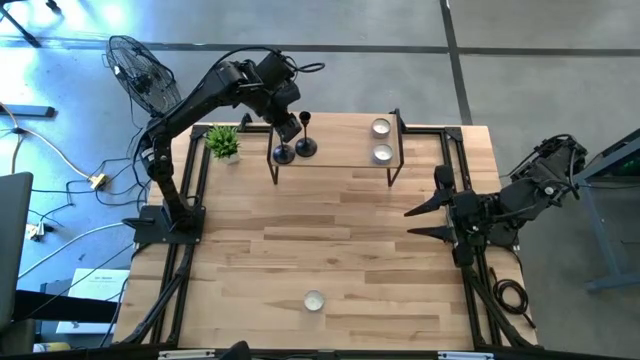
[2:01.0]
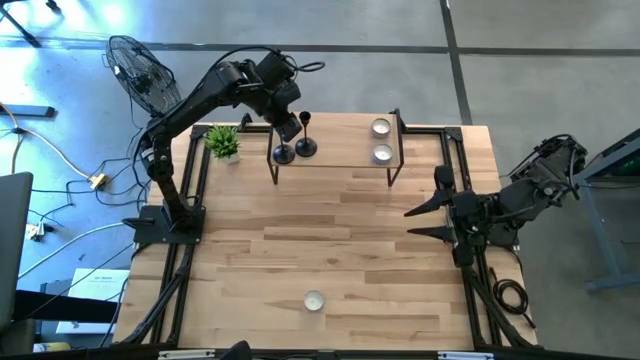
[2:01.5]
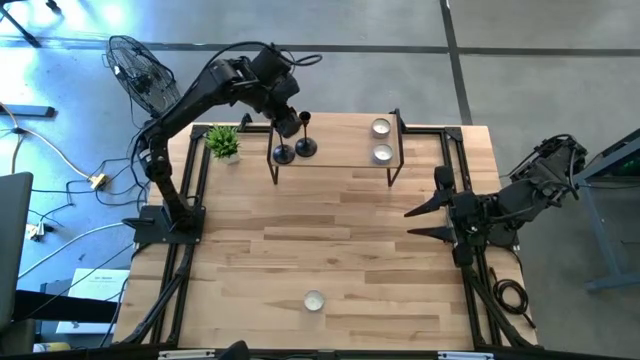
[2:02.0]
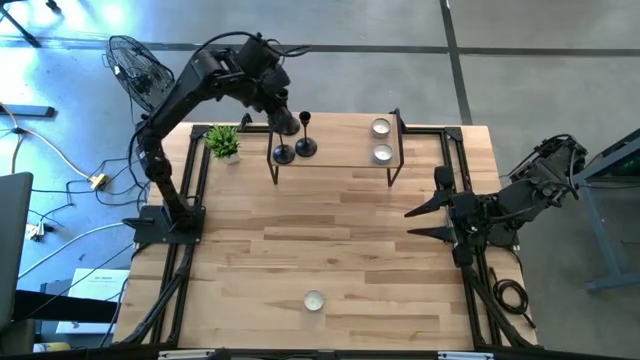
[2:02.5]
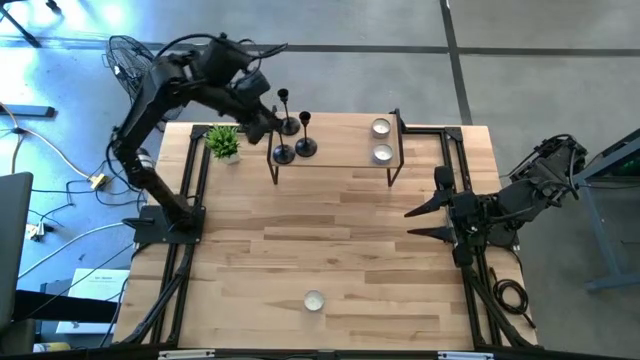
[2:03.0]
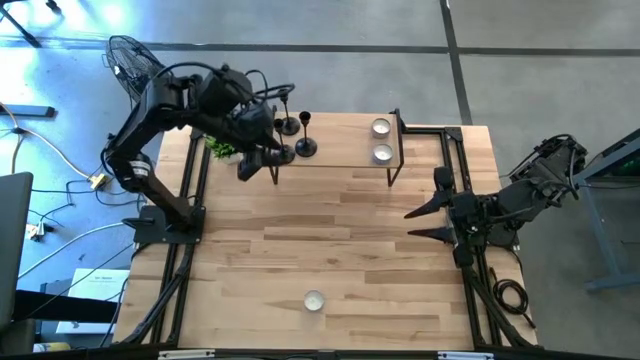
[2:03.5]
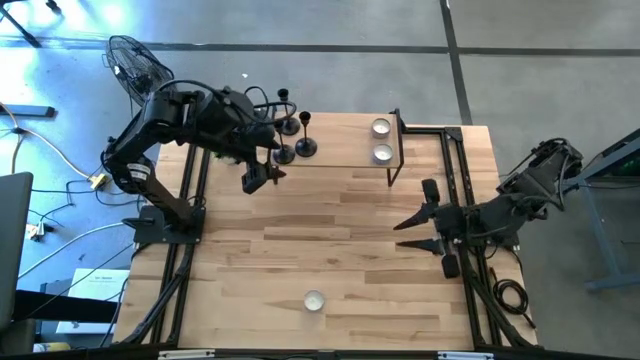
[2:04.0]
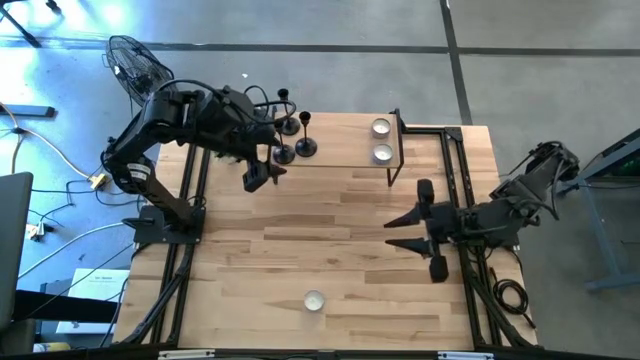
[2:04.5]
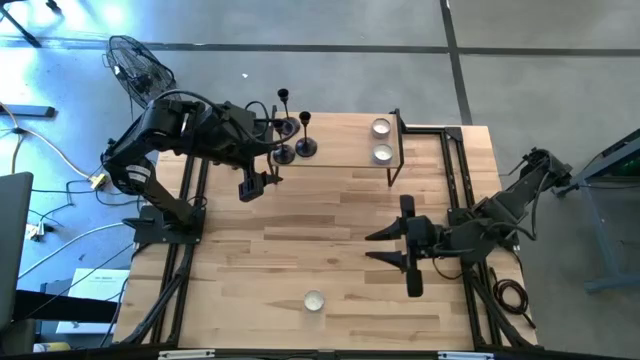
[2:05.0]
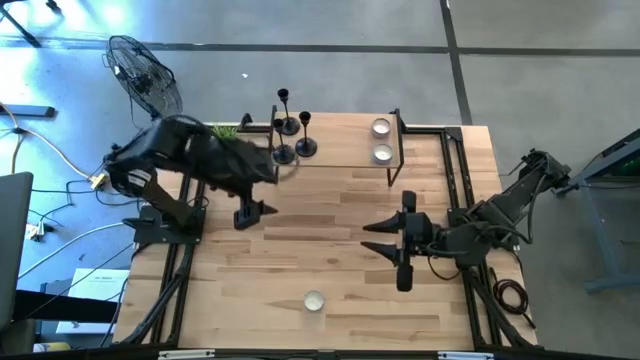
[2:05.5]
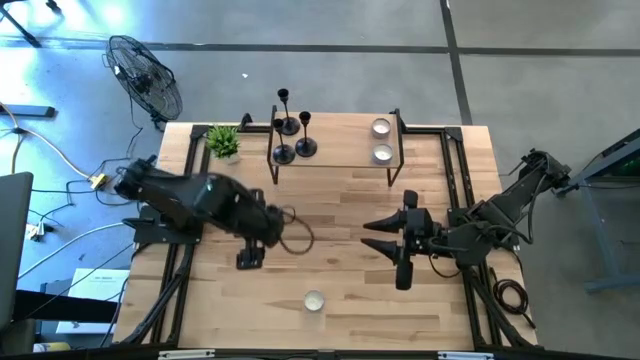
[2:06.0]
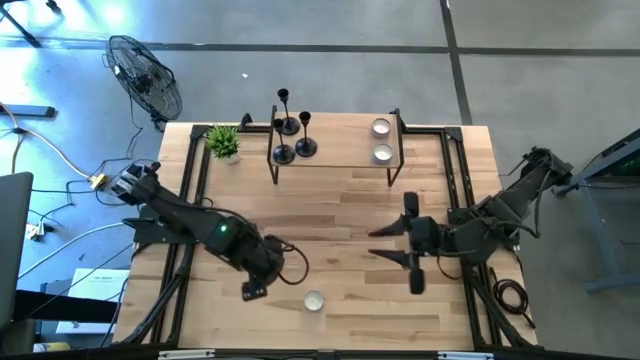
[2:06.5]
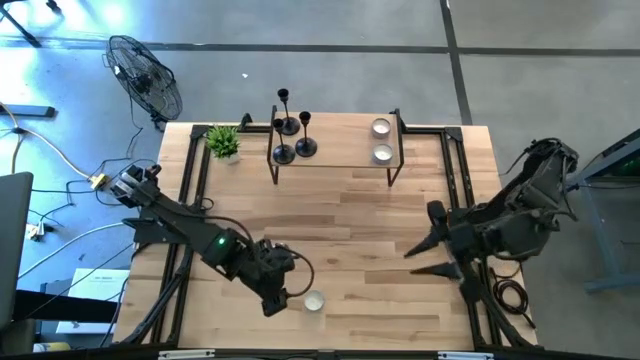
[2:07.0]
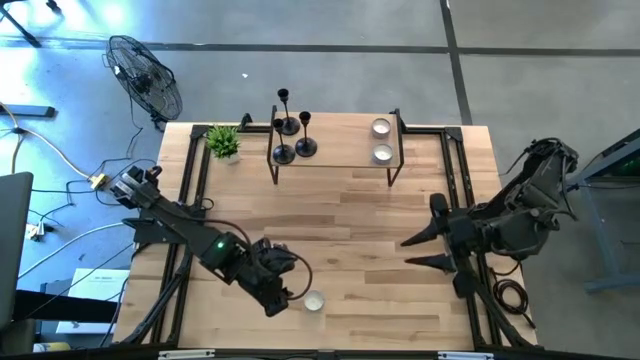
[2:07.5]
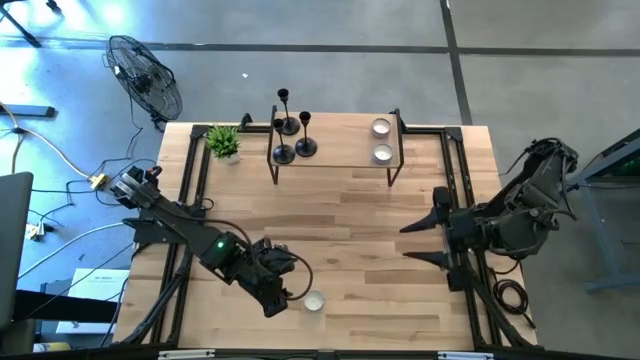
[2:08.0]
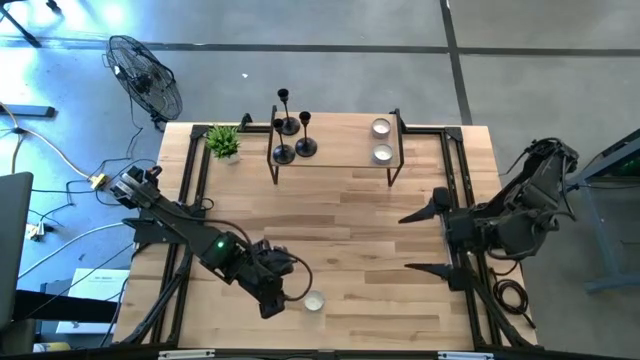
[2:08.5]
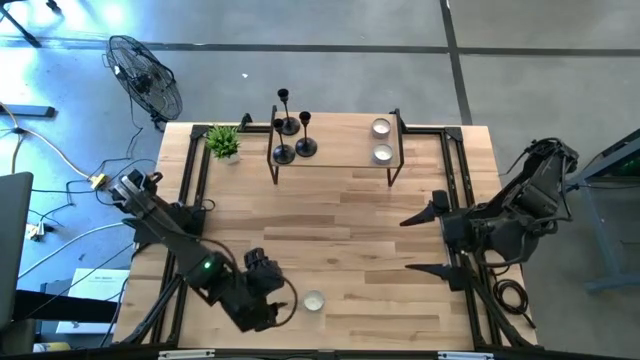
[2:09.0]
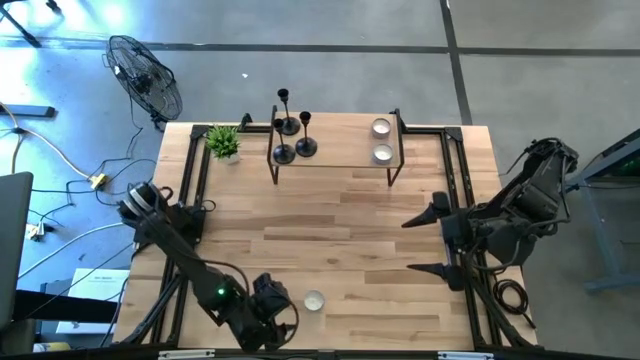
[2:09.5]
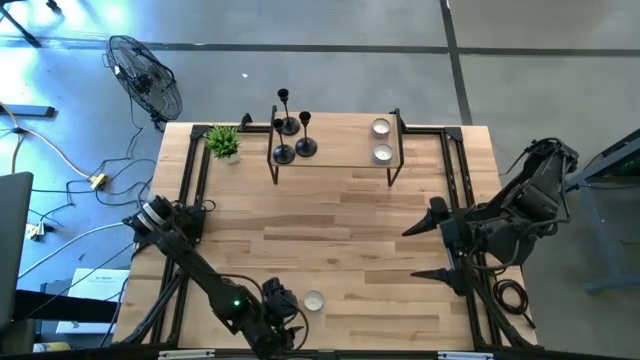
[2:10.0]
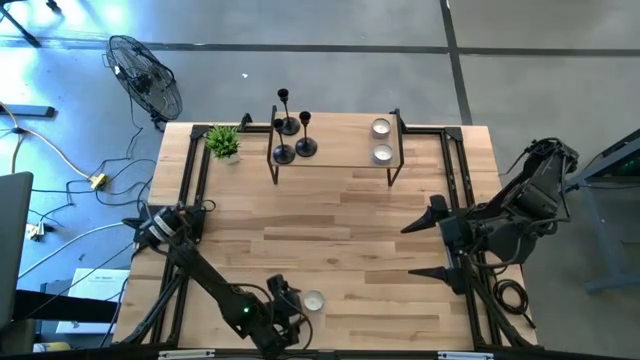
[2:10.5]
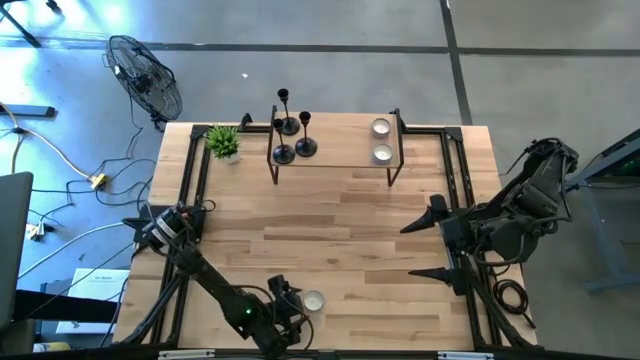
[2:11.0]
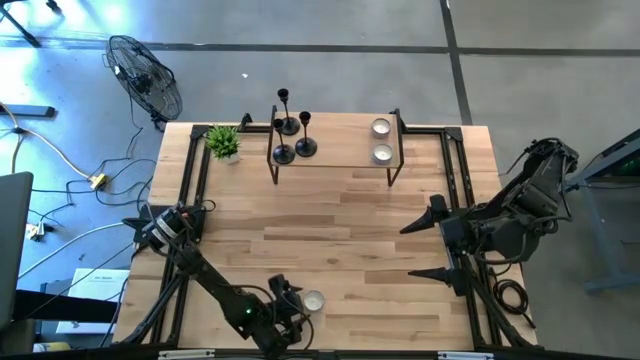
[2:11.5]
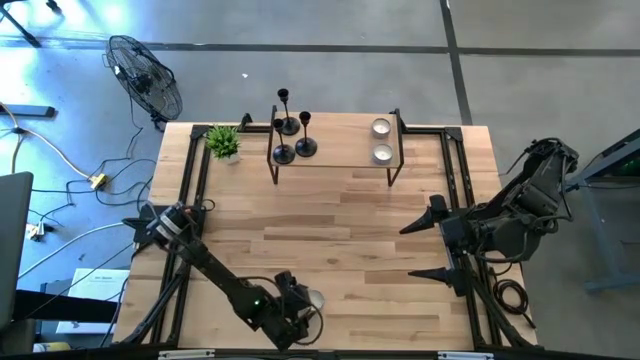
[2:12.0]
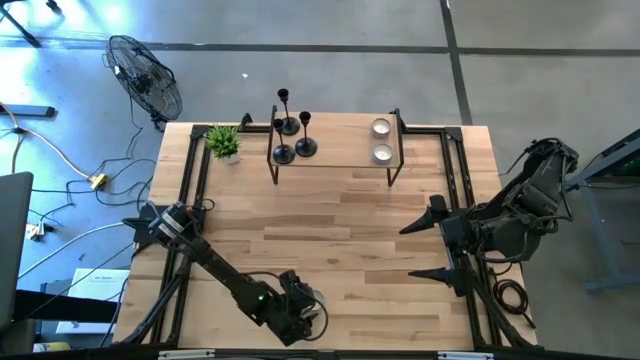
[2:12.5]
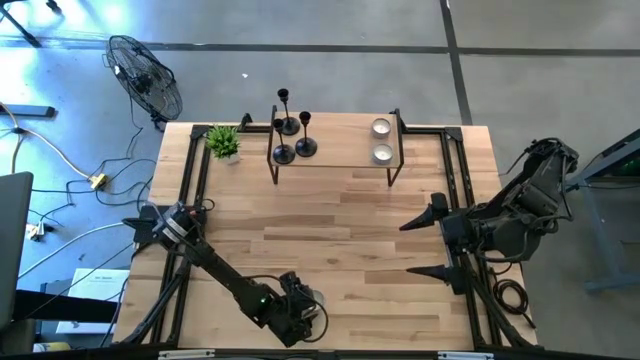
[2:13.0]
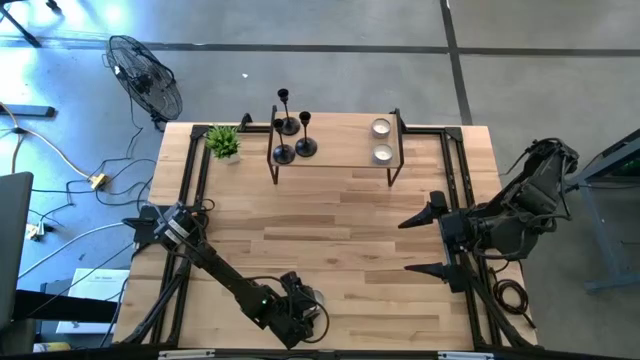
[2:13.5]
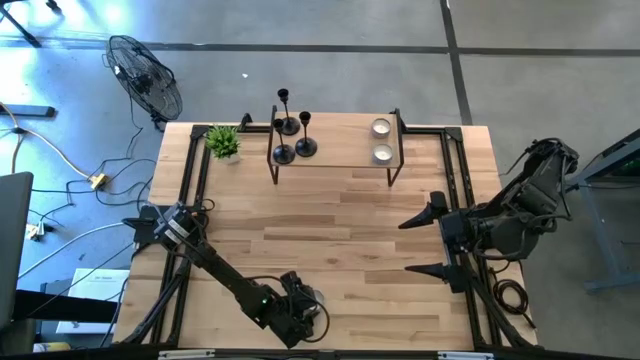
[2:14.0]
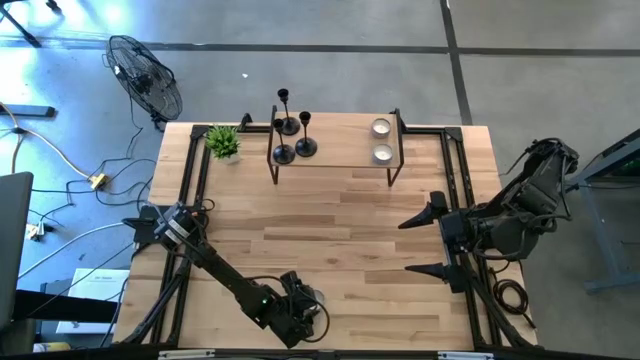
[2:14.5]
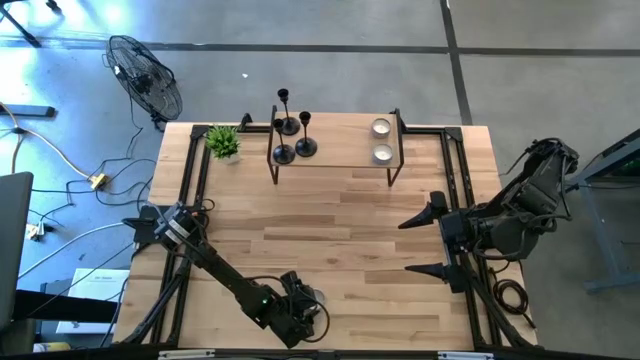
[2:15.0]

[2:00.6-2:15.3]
Task: Pick & Place candle stick holders
Put the red patterned scented candle on the shelf

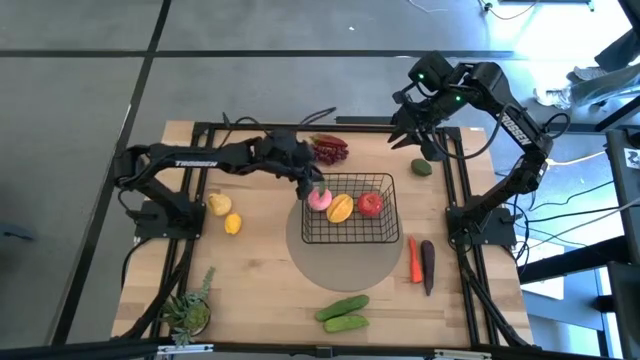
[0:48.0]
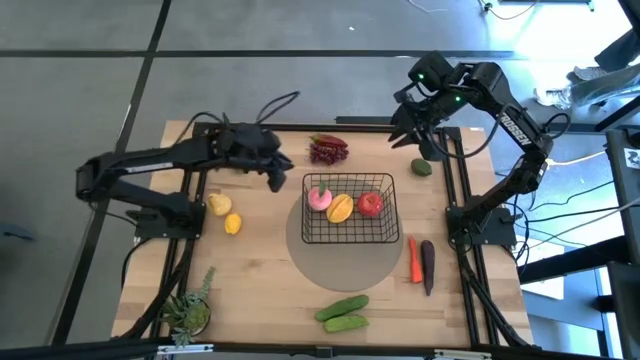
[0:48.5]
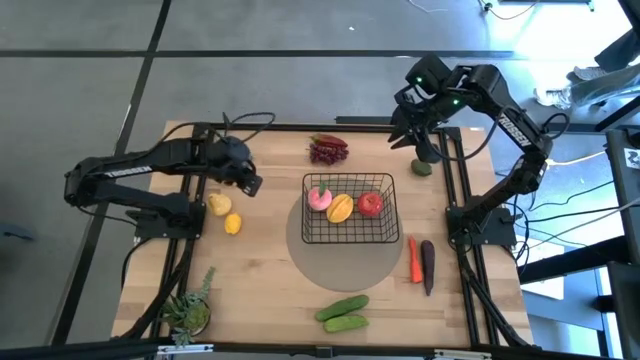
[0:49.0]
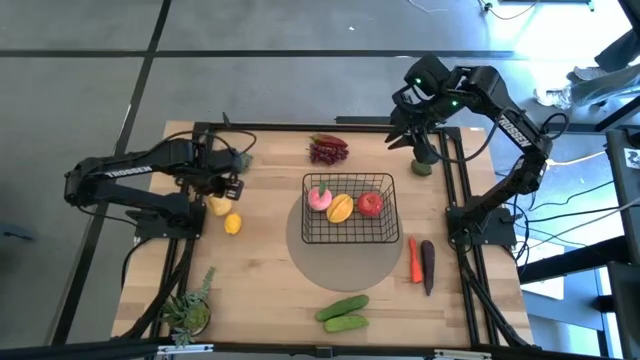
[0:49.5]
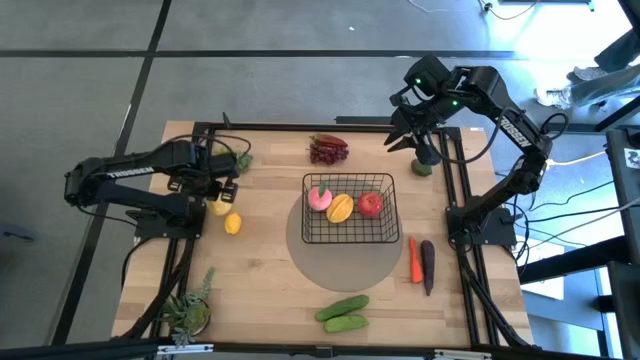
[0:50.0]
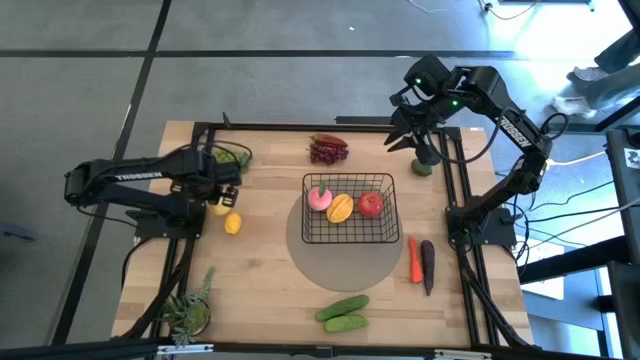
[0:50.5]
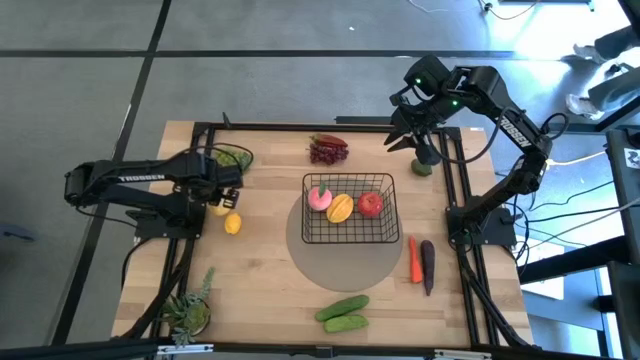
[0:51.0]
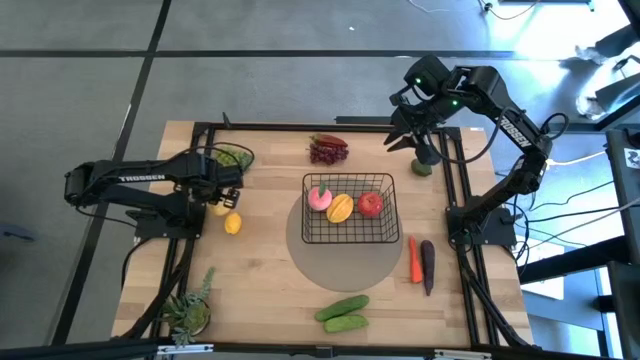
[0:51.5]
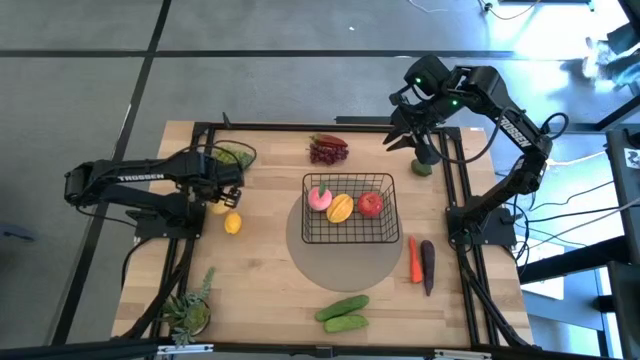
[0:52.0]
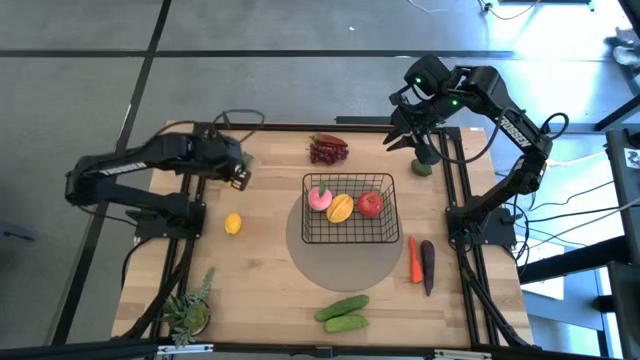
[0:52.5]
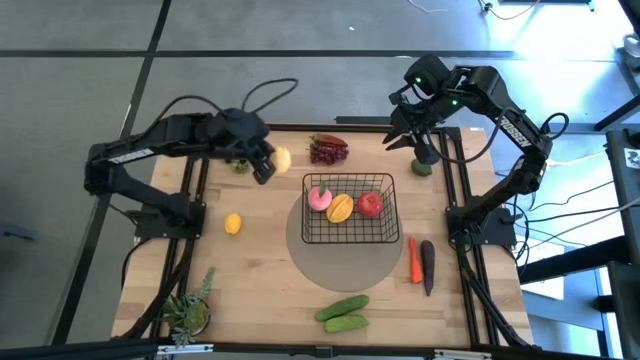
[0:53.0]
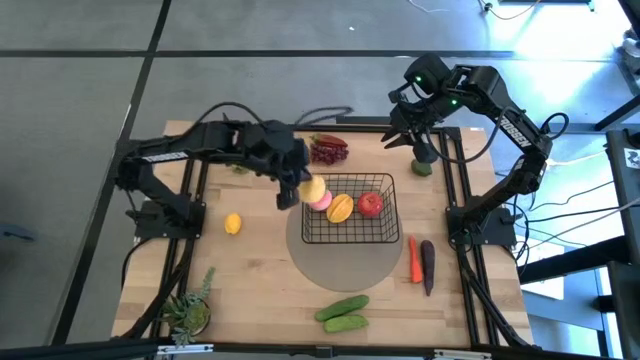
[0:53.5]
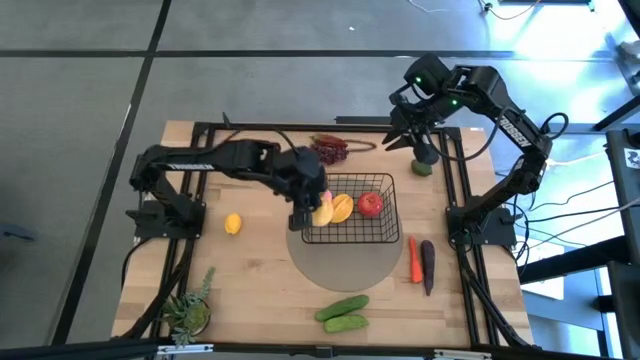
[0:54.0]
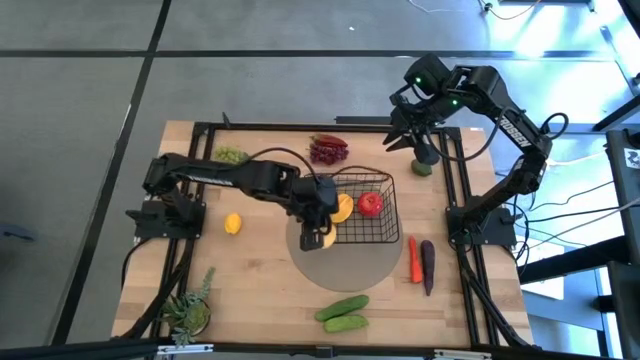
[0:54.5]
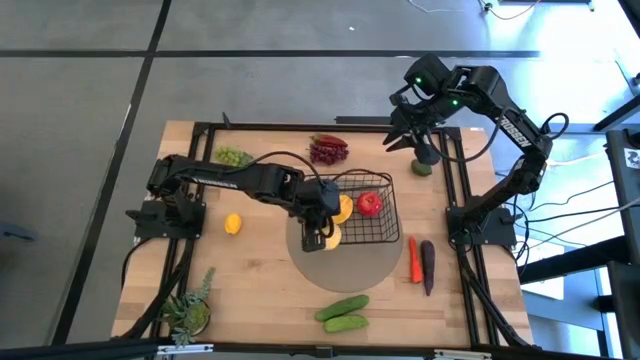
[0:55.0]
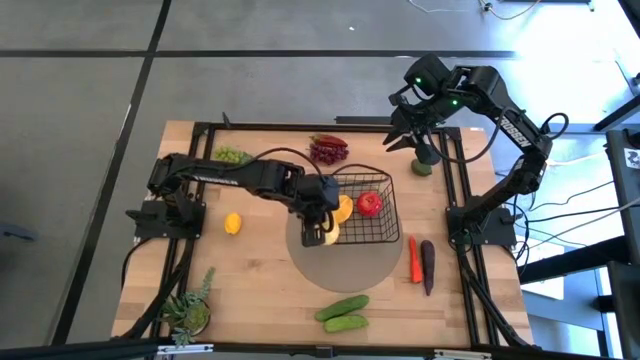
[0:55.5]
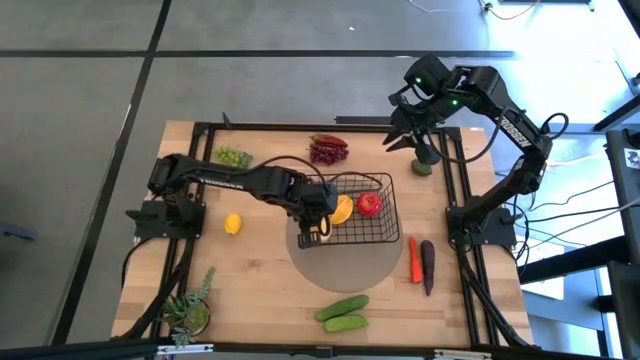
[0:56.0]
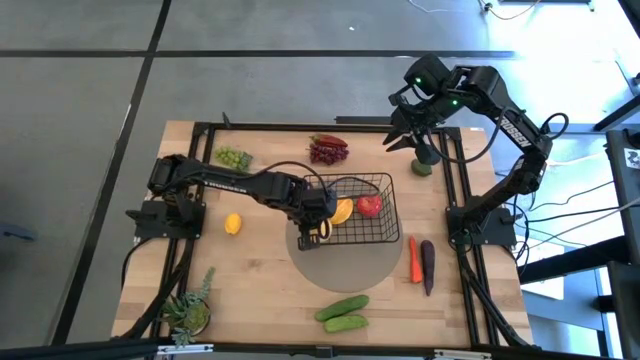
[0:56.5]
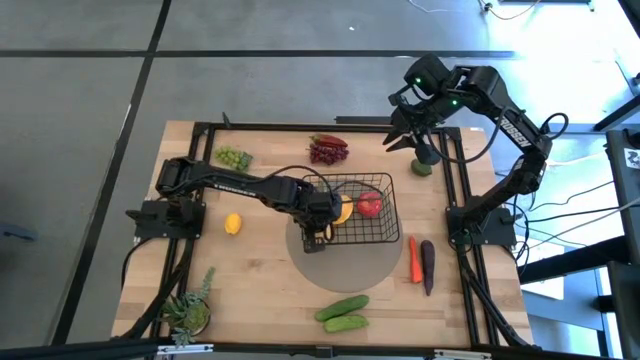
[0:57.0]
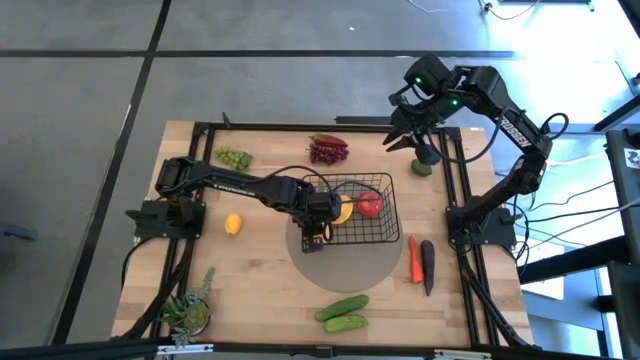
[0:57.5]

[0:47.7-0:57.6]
Task: Build produce basket
Put the yellow pear into the black wire basket
